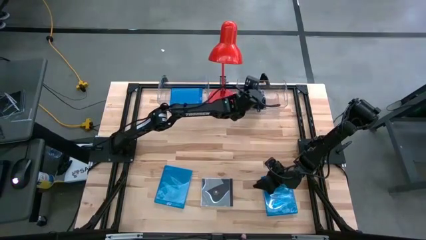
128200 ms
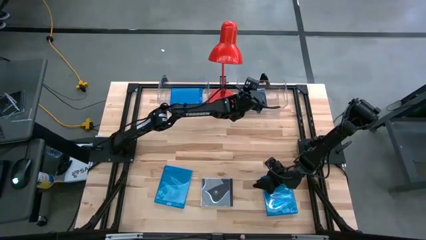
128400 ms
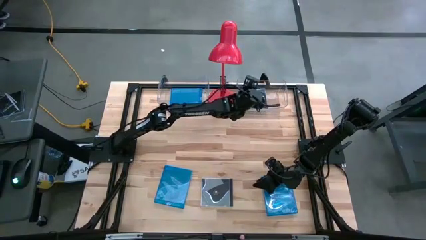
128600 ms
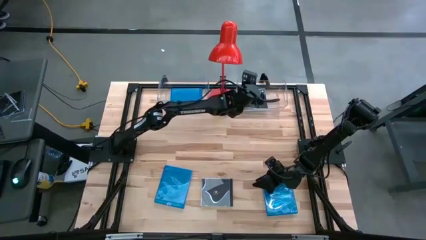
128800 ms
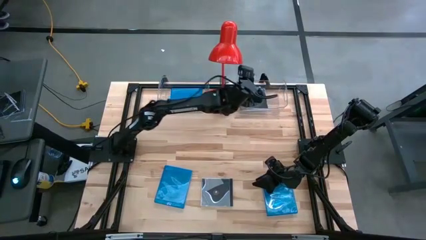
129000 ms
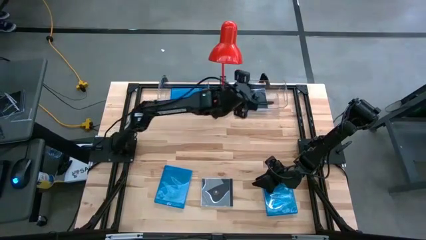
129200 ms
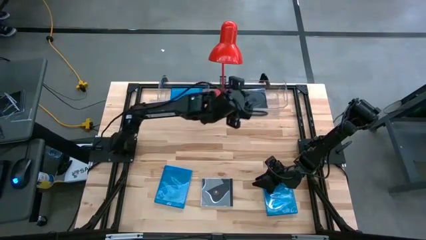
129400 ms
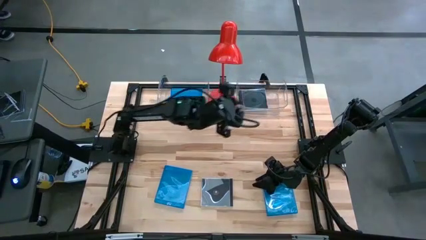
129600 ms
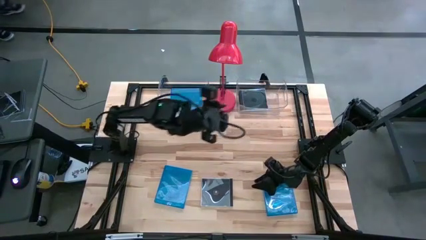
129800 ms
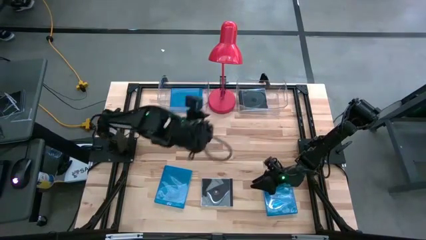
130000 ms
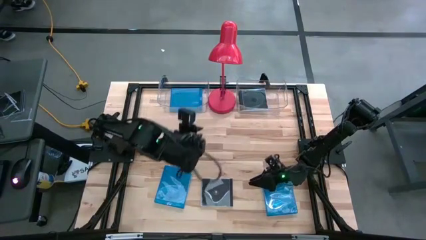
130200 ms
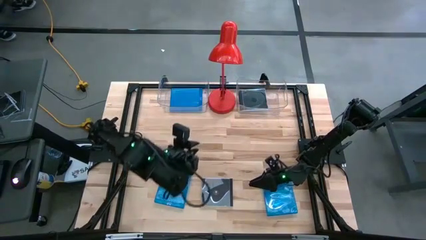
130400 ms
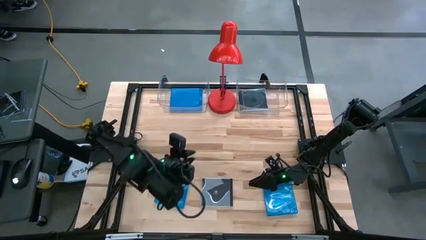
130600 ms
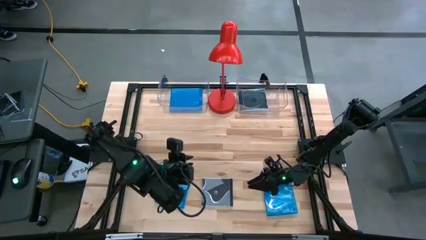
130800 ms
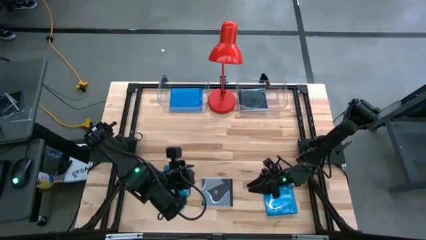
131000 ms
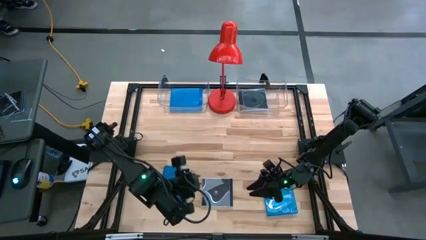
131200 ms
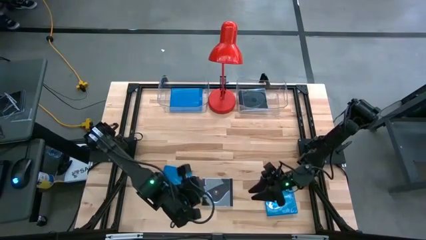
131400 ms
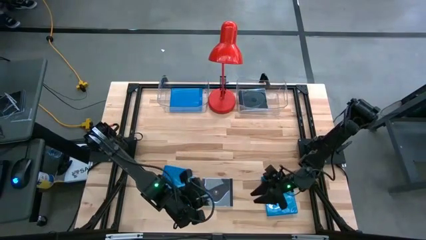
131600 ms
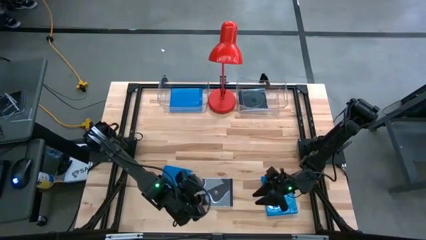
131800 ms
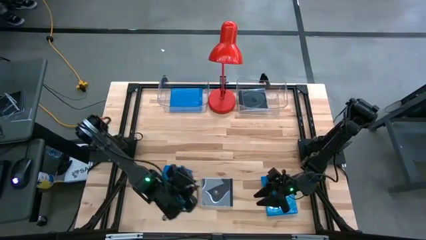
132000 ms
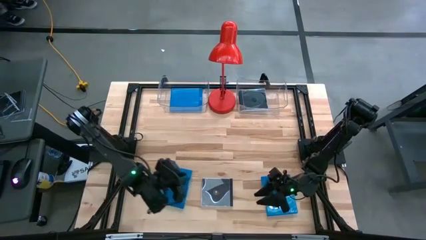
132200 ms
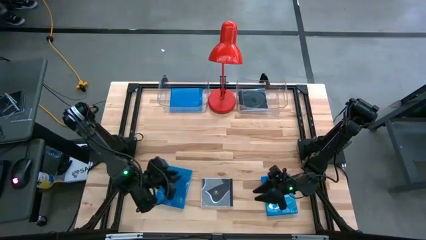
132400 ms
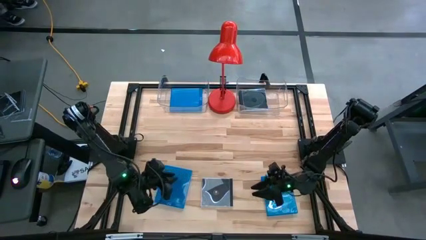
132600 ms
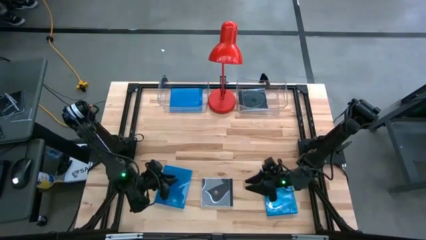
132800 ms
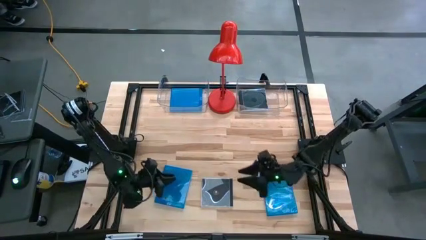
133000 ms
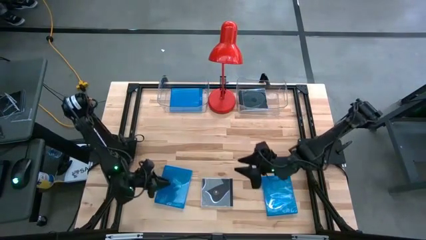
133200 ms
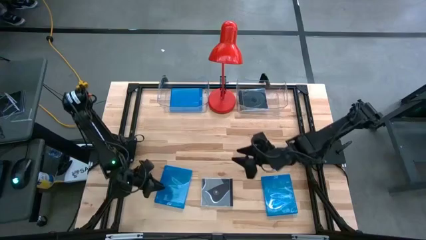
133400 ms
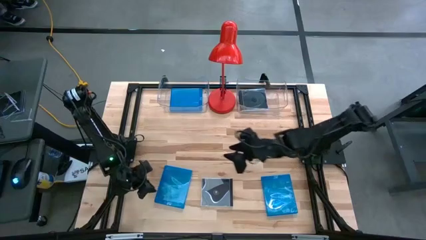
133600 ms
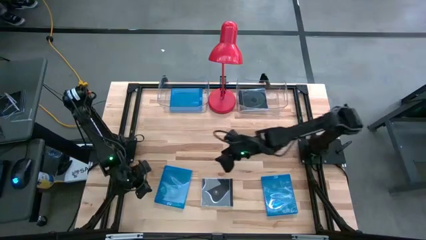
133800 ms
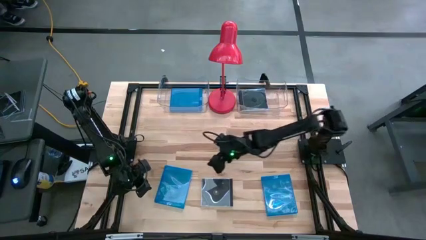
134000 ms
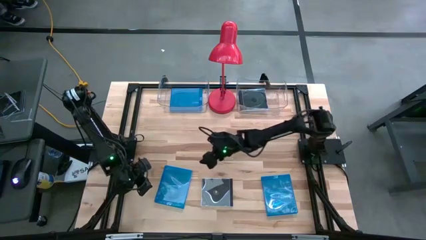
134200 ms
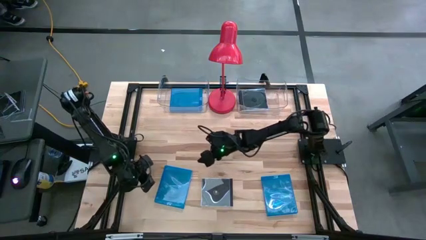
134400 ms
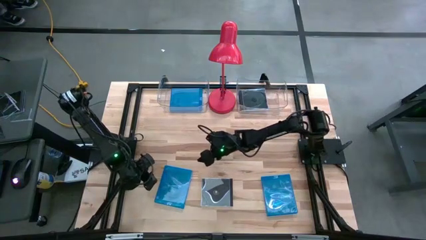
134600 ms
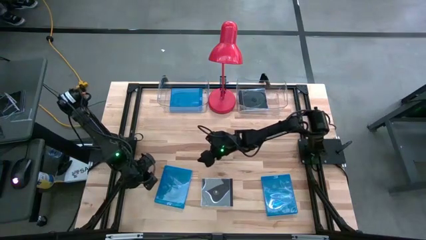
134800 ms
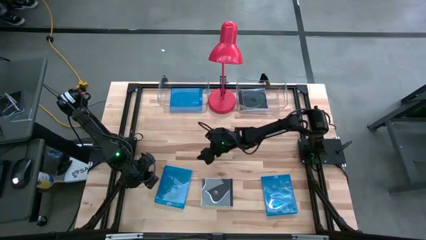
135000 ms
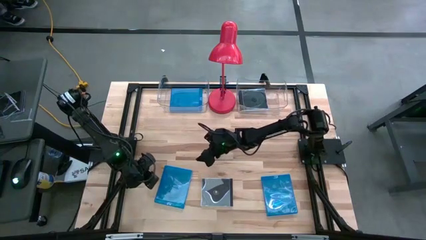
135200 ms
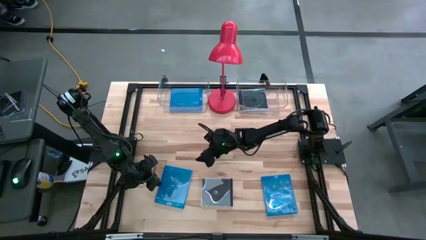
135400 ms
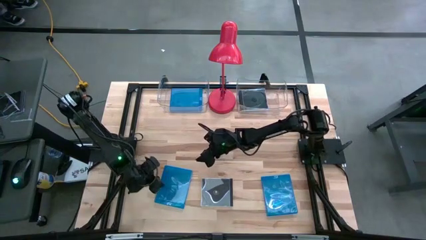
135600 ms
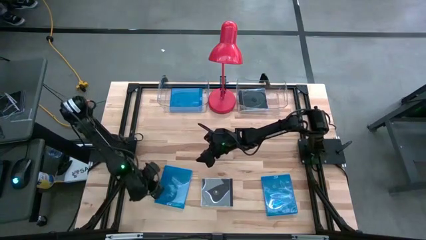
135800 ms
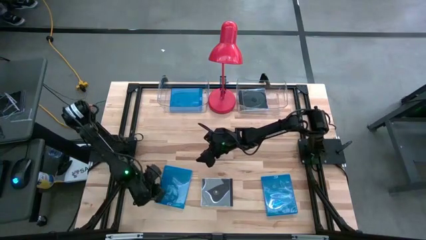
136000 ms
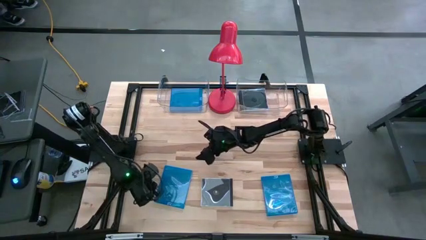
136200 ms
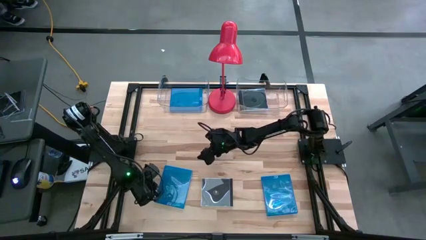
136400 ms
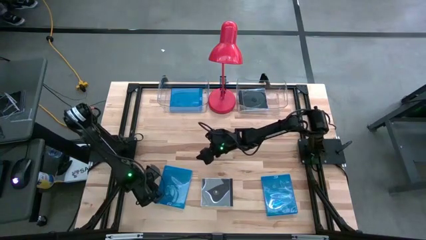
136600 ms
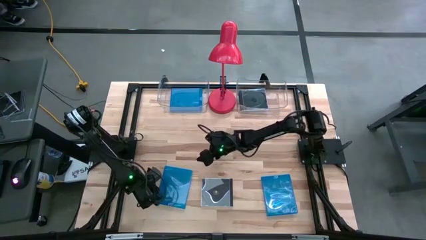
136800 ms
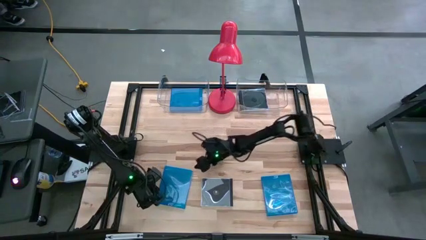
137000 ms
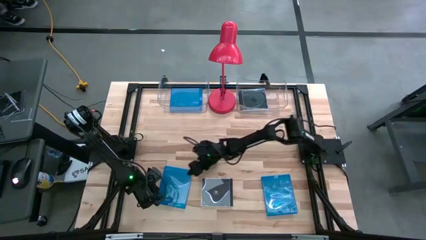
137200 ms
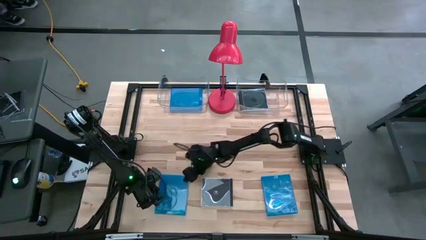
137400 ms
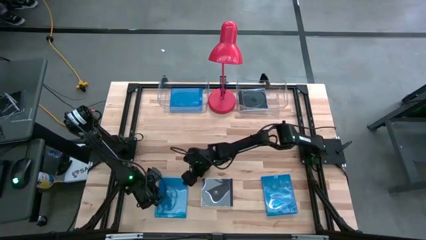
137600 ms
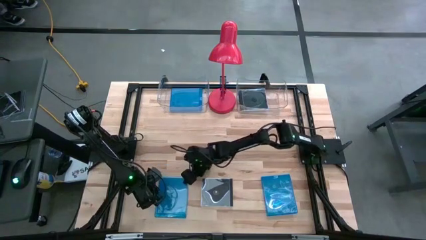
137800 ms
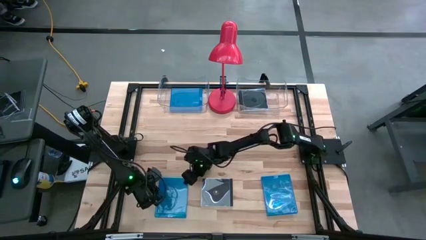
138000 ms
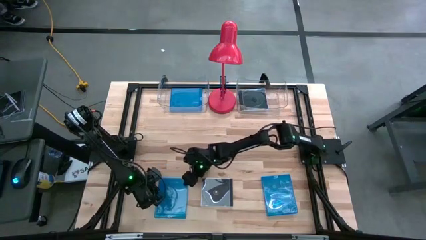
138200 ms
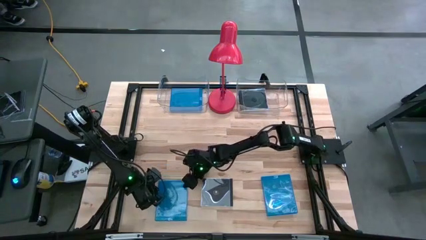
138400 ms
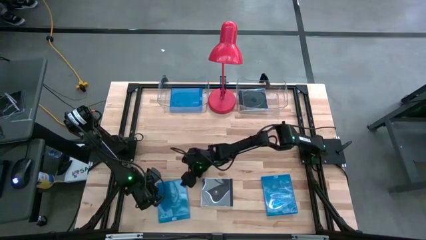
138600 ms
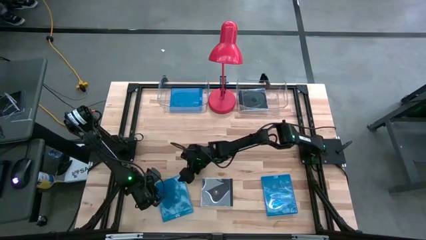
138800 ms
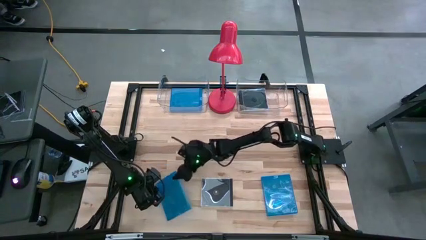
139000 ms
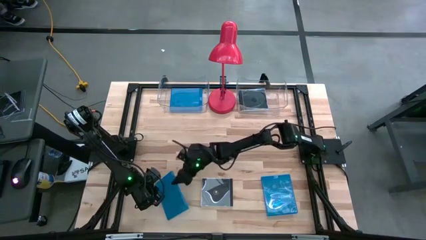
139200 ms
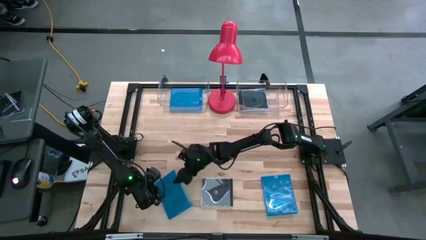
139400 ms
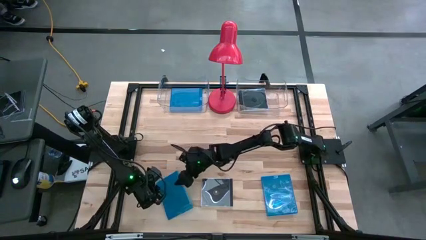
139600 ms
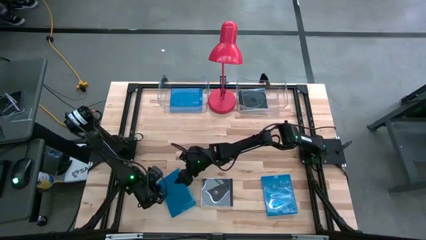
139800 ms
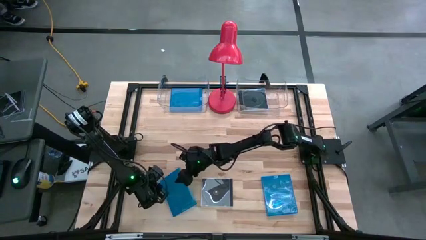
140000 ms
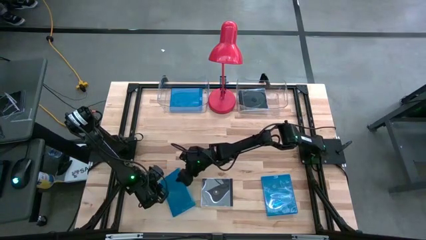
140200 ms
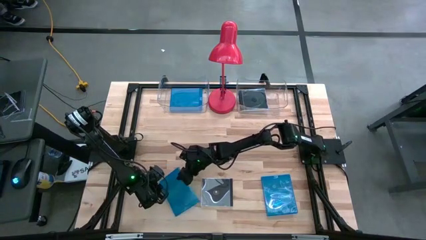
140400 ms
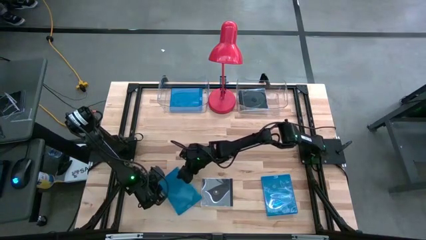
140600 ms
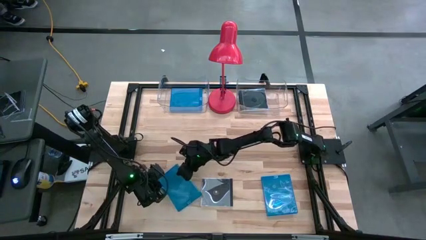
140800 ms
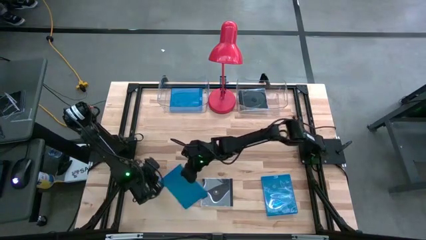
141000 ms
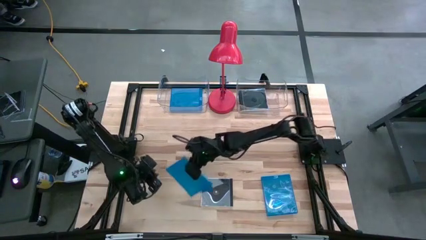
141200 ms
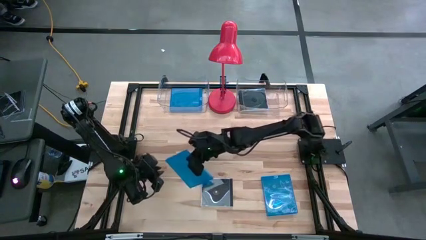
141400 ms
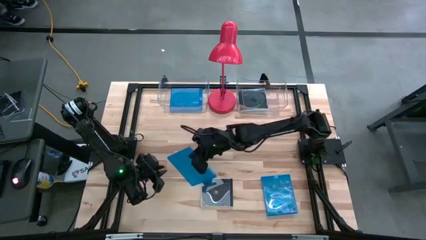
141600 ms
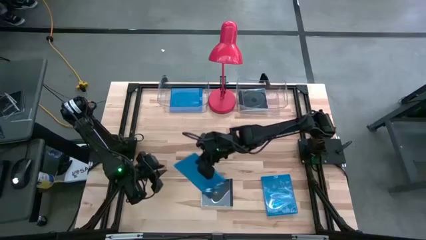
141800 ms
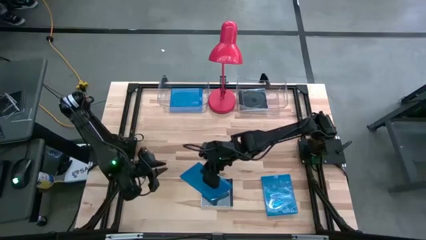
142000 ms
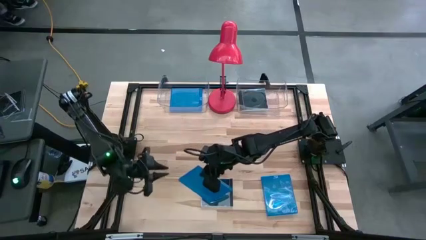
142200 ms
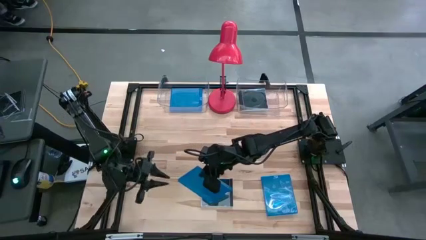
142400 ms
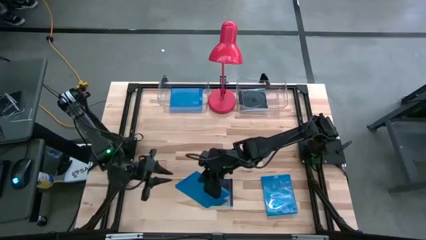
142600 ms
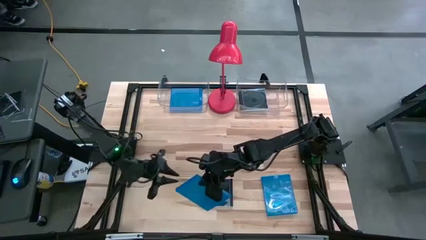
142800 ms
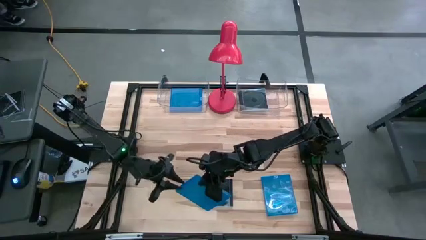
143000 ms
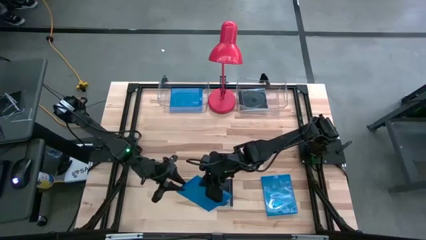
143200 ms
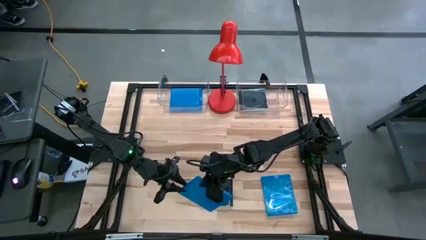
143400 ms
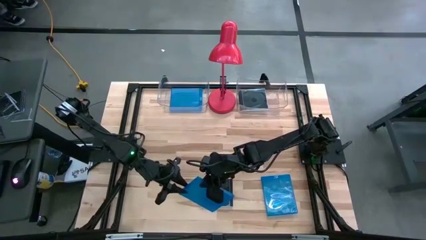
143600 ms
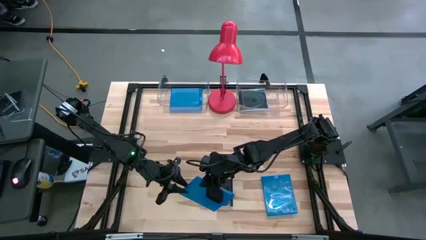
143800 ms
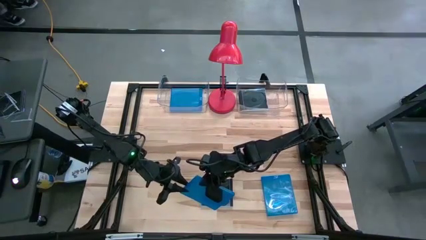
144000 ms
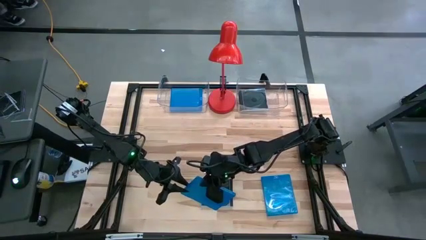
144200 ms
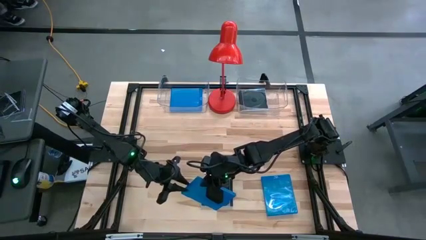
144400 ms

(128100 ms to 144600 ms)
Task: Pick & place jewel cases by type
Put the left blue cd case into the left transparent bin

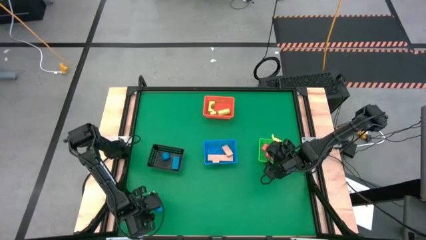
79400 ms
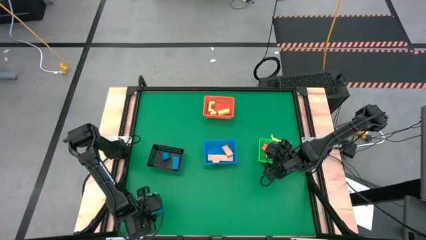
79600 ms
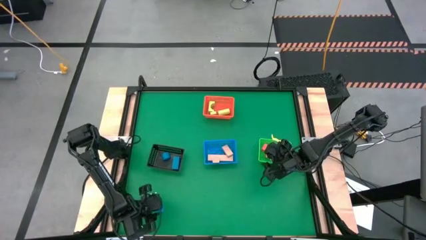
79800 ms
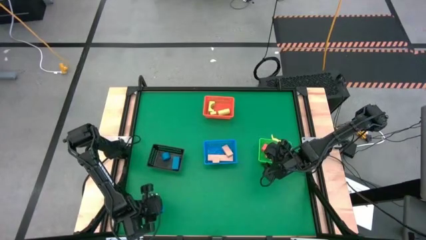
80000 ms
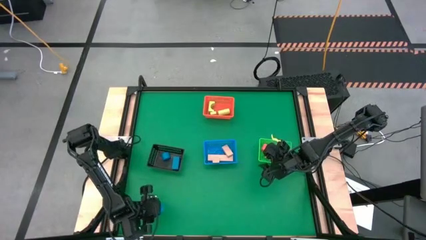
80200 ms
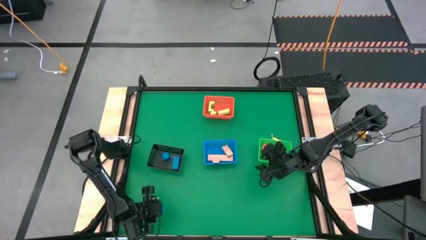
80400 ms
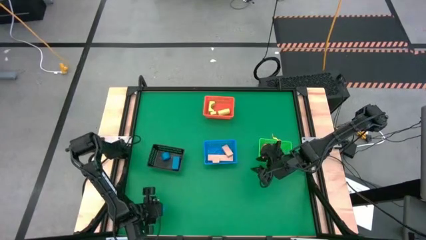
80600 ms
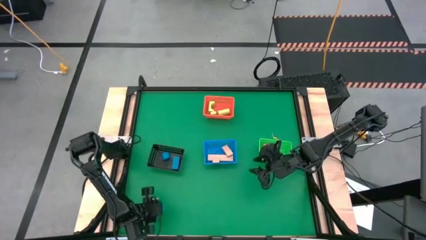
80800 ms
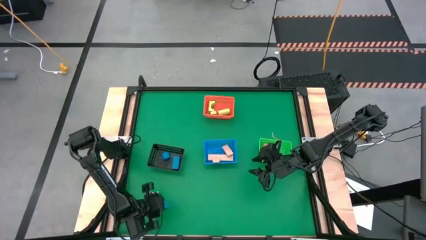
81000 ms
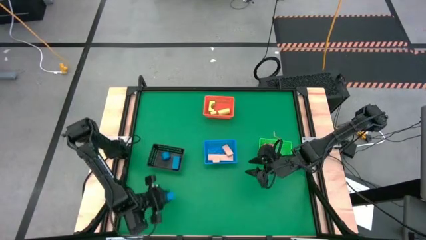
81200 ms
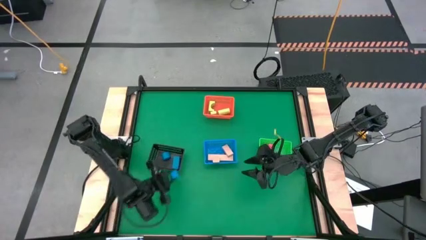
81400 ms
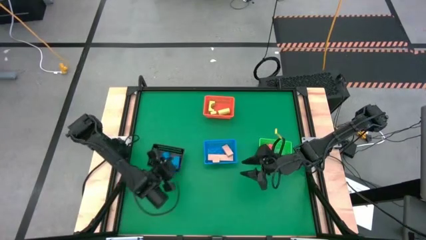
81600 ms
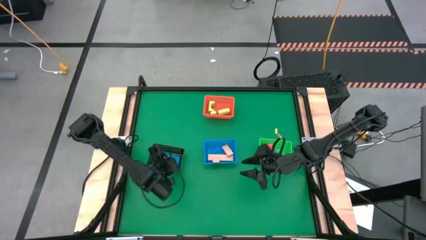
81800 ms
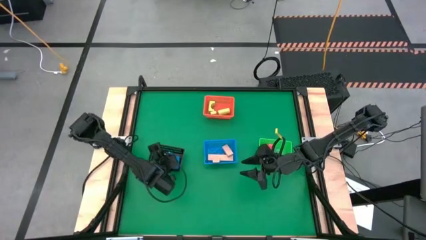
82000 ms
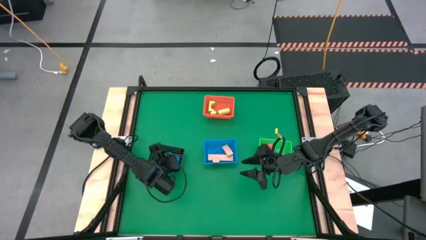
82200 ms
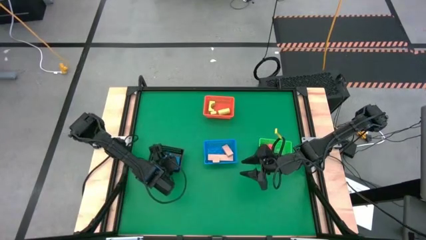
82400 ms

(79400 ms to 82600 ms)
Task: Sort & place blocks by color
Put the blue block into the black bin
